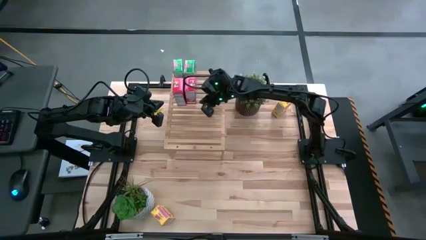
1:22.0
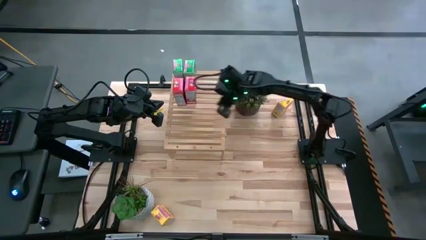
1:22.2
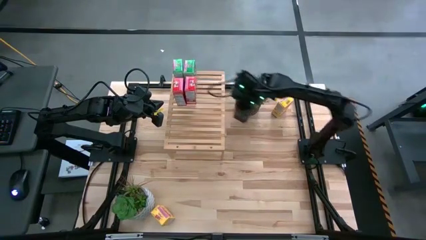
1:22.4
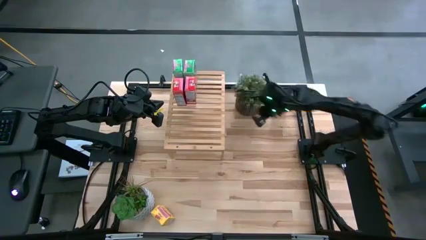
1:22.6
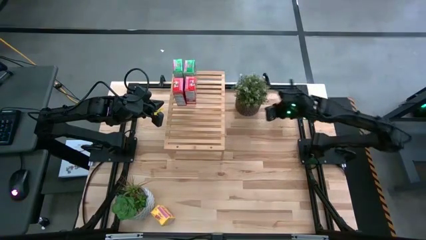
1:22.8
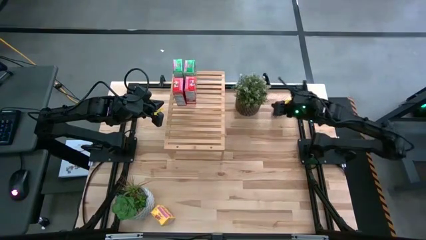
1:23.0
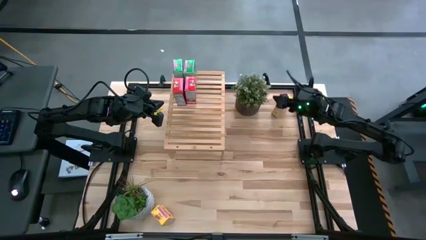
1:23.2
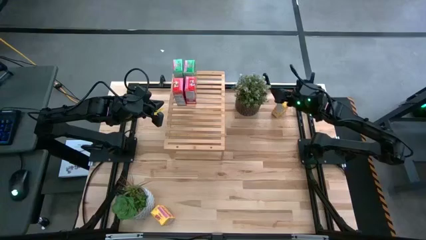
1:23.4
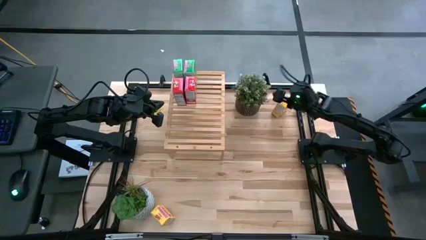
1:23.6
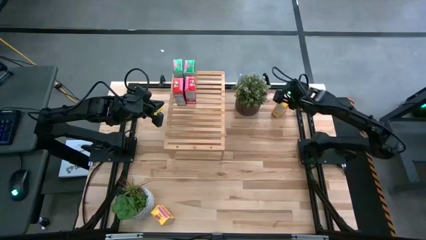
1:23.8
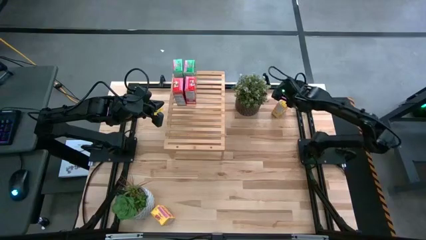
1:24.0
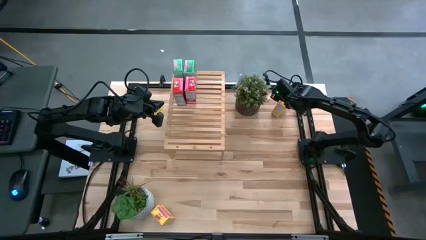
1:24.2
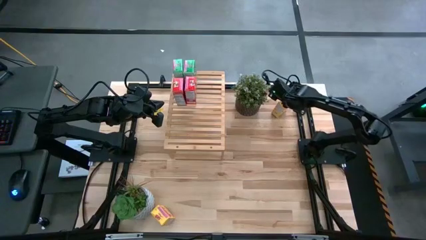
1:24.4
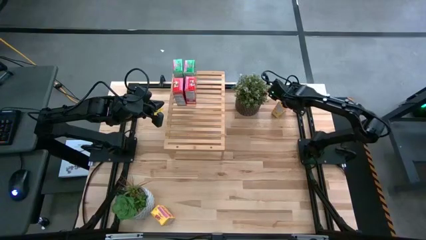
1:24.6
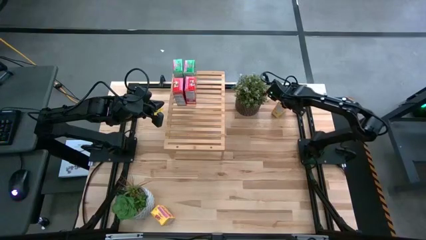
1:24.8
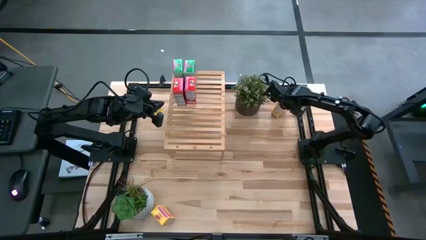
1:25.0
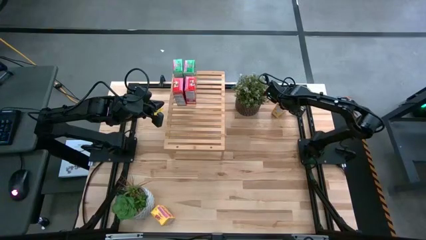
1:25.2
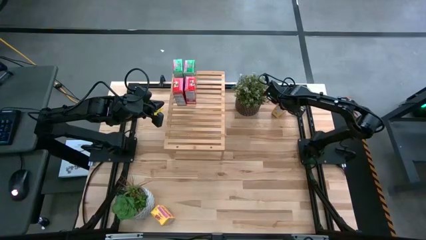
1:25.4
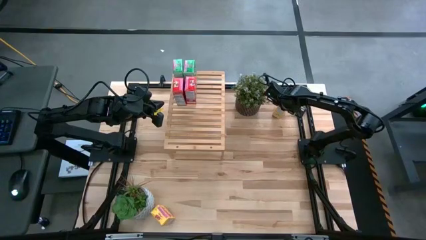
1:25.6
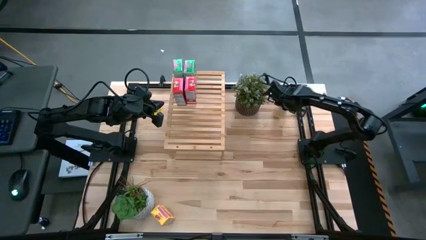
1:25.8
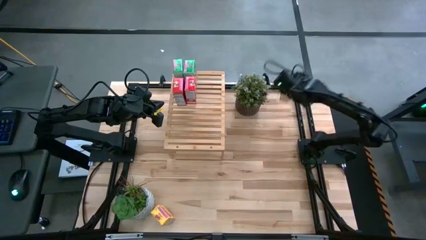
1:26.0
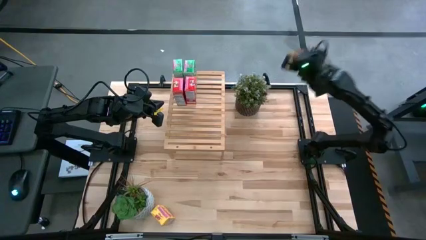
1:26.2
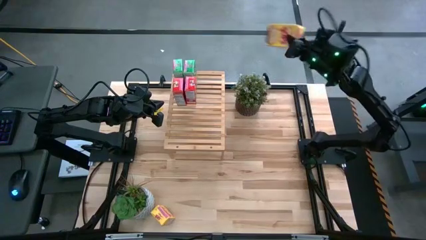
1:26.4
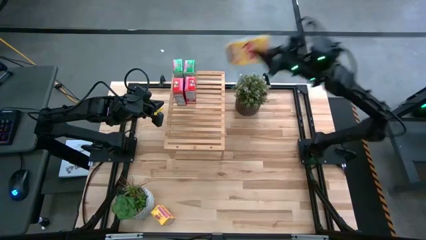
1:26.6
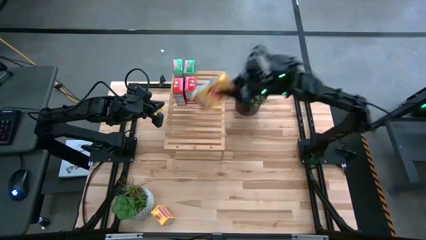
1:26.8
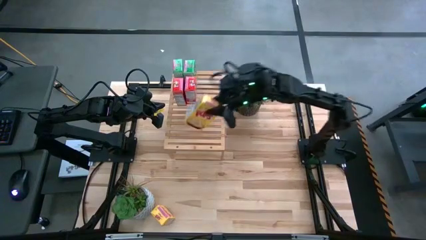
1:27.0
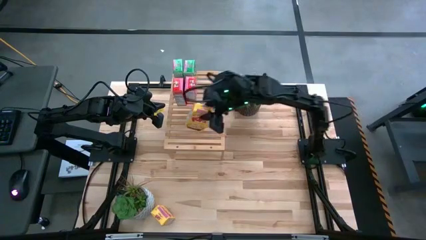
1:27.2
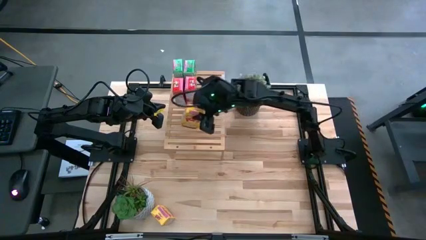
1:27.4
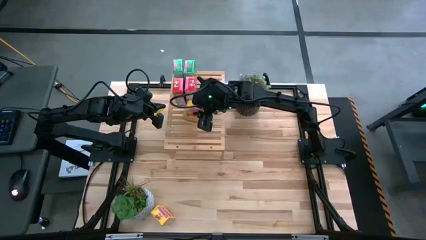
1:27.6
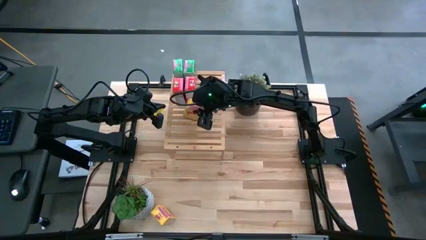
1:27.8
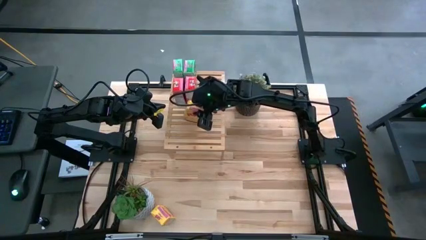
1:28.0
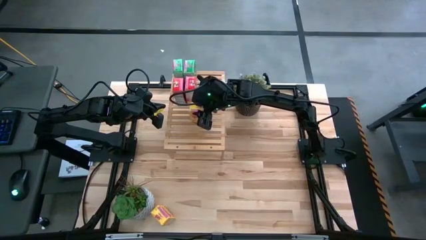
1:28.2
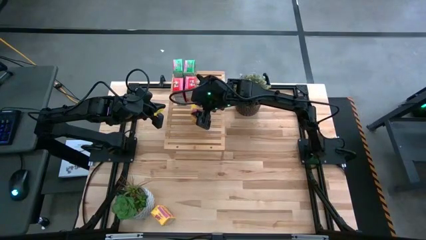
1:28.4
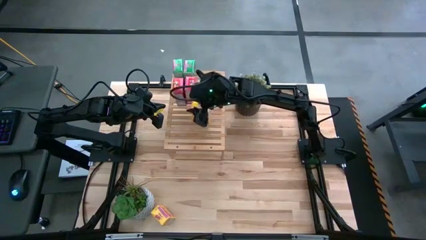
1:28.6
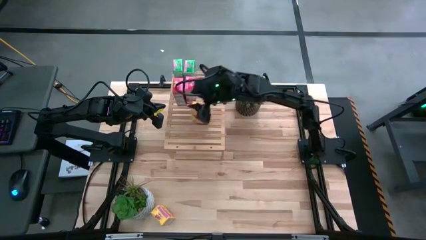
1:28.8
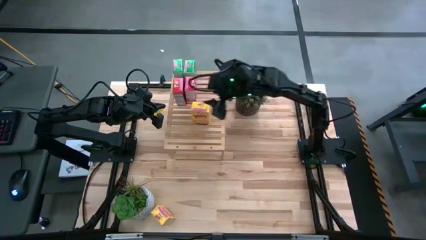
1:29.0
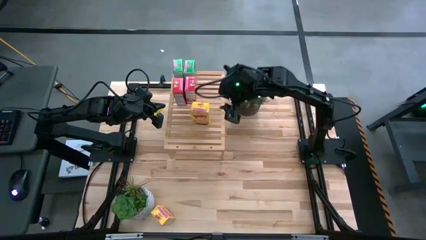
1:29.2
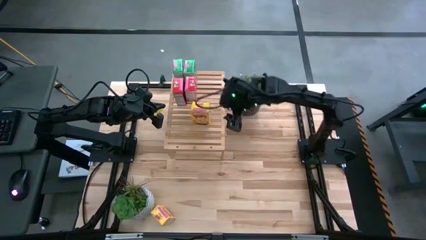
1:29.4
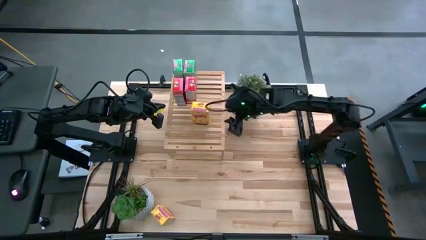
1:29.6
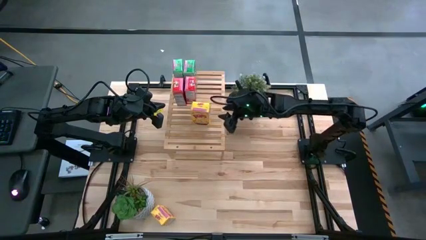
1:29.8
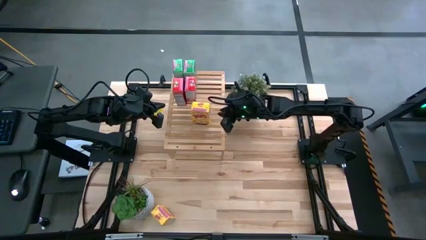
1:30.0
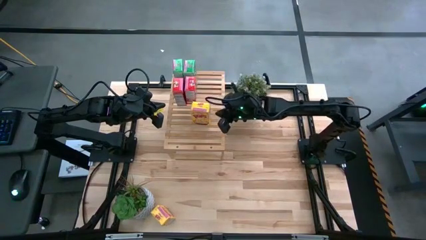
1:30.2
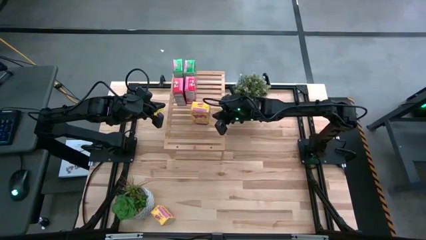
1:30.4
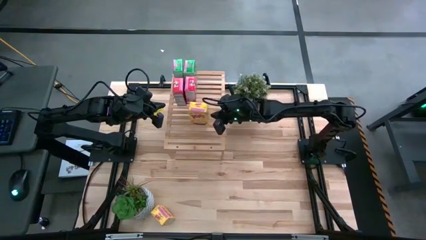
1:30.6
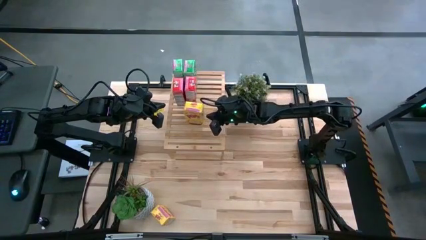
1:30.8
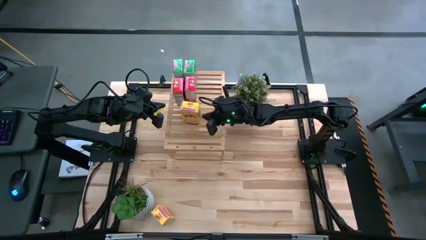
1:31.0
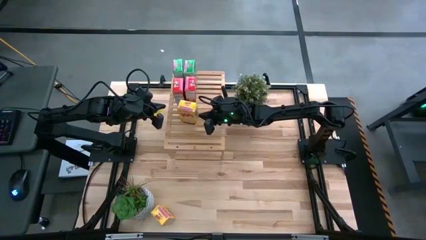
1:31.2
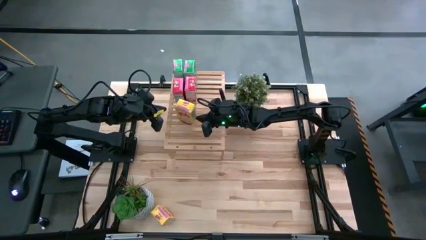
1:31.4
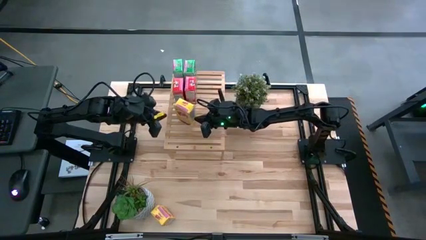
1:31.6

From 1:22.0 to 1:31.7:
Task: Stack cereal on shelf
Put the top yellow cereal box on the shelf

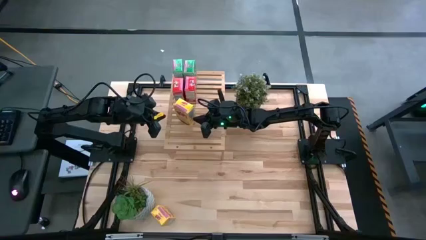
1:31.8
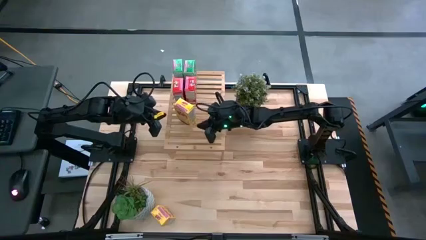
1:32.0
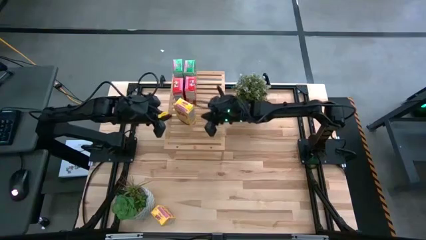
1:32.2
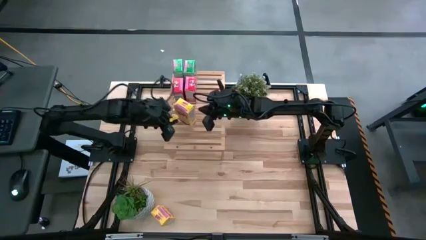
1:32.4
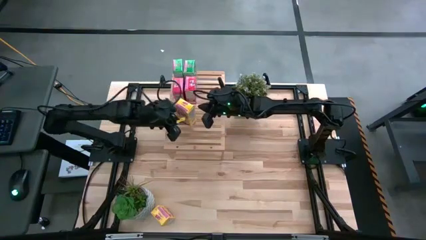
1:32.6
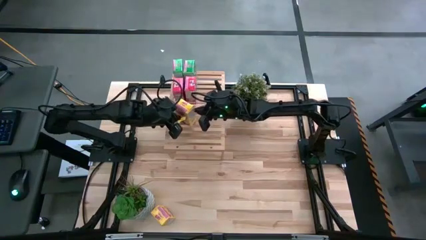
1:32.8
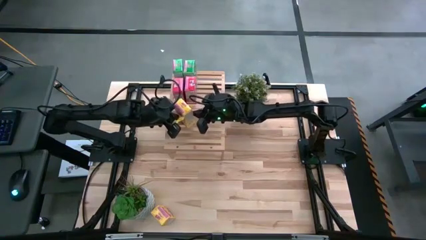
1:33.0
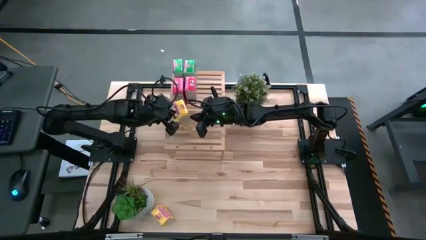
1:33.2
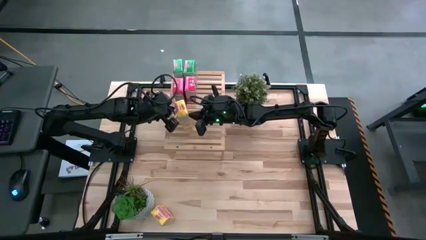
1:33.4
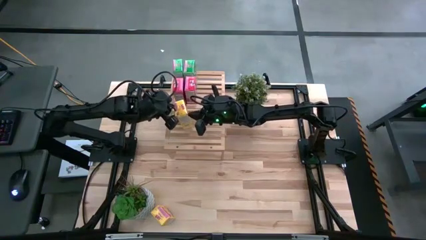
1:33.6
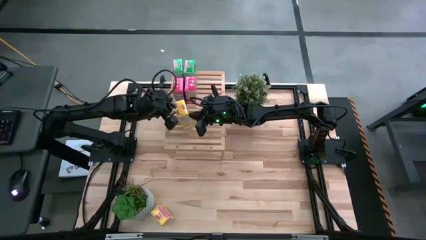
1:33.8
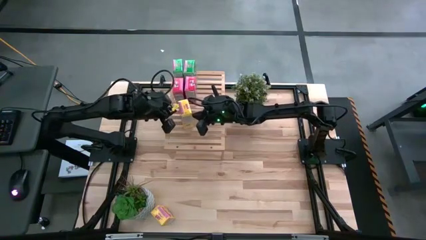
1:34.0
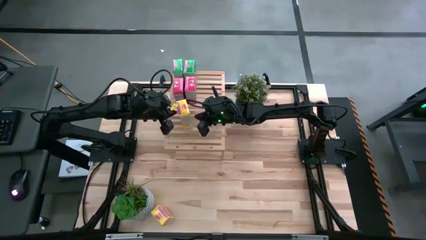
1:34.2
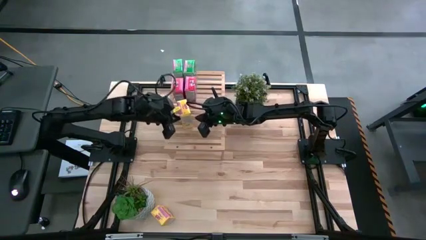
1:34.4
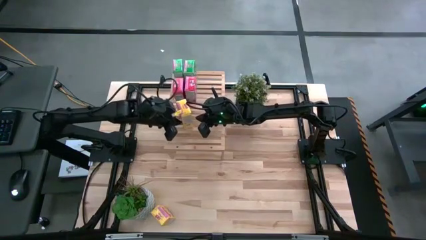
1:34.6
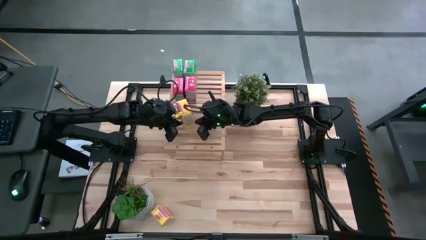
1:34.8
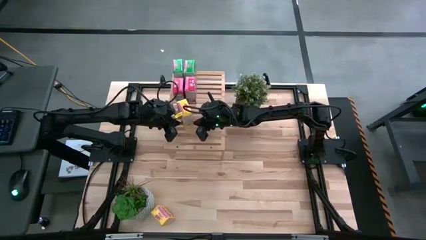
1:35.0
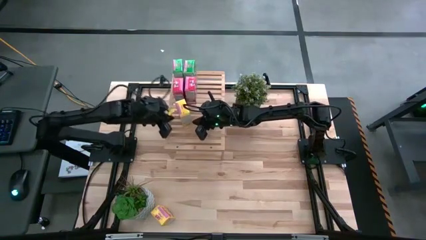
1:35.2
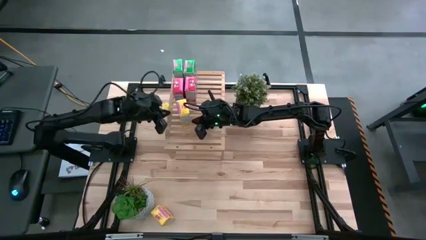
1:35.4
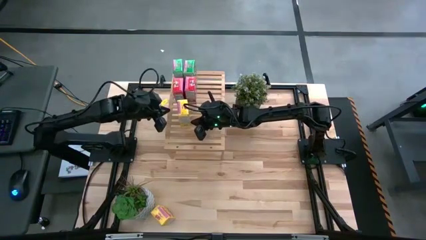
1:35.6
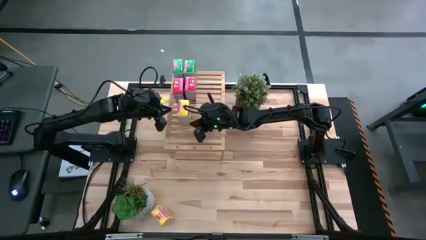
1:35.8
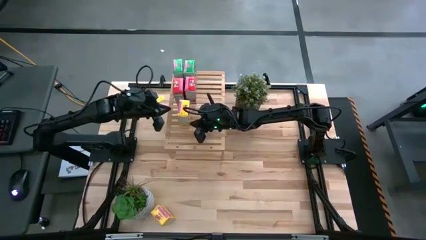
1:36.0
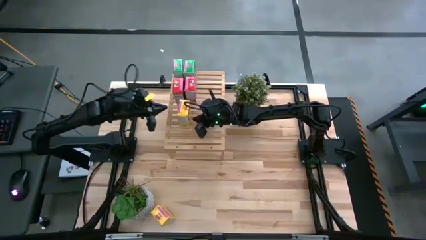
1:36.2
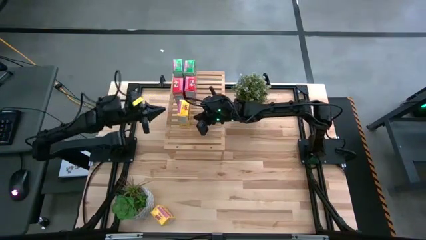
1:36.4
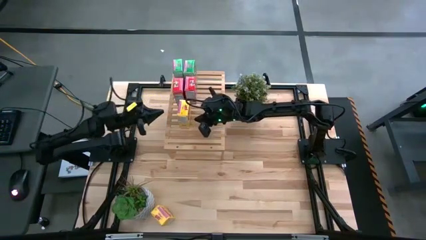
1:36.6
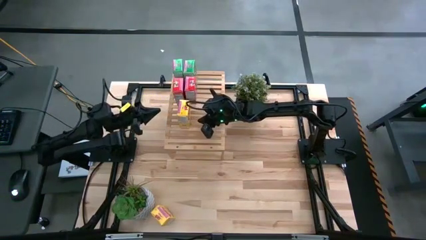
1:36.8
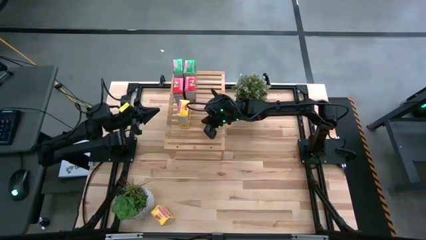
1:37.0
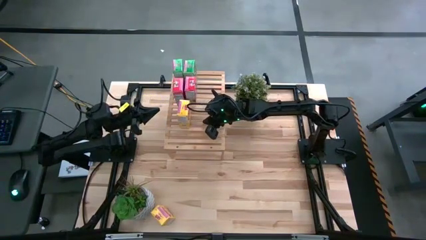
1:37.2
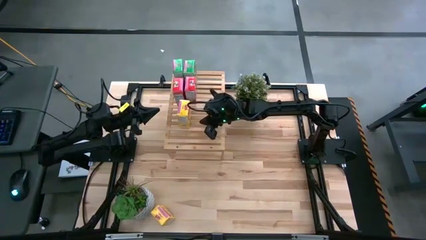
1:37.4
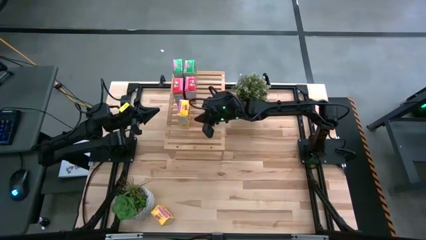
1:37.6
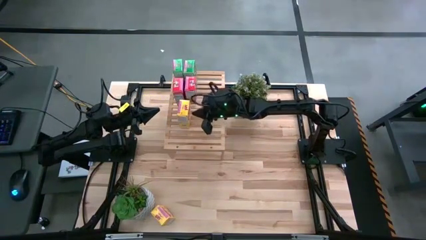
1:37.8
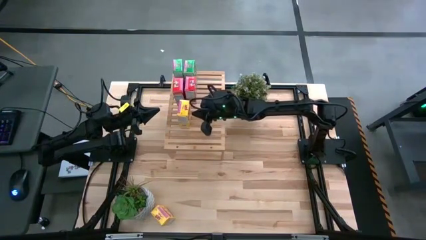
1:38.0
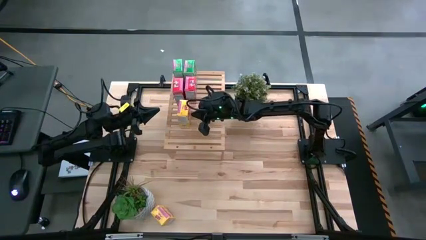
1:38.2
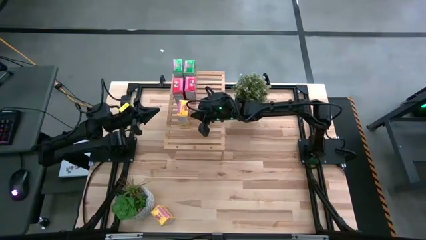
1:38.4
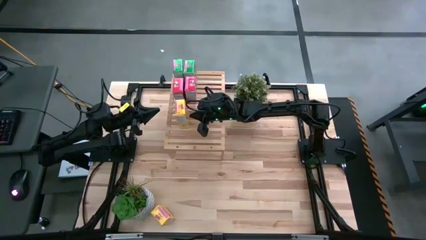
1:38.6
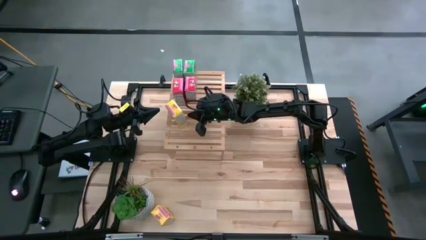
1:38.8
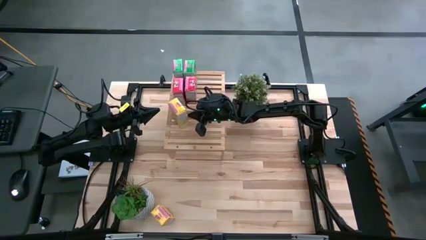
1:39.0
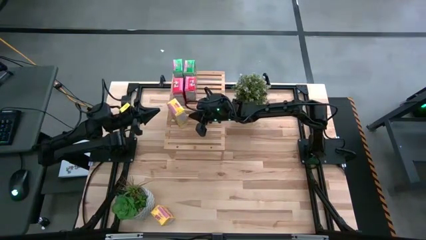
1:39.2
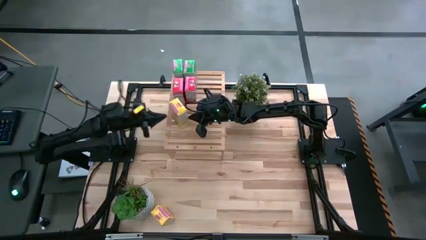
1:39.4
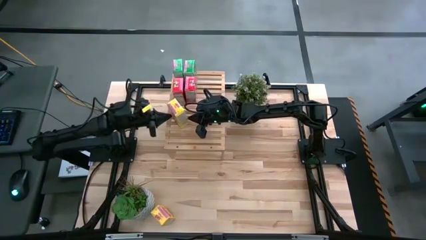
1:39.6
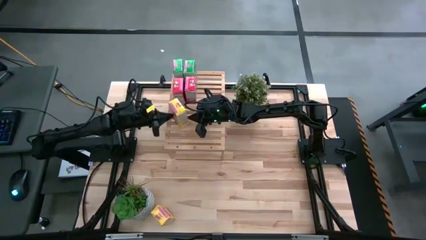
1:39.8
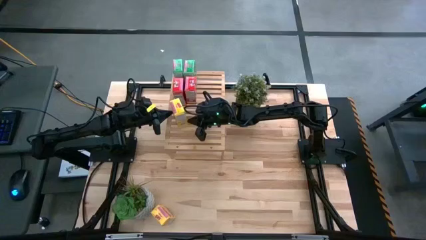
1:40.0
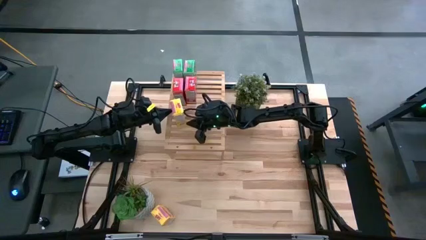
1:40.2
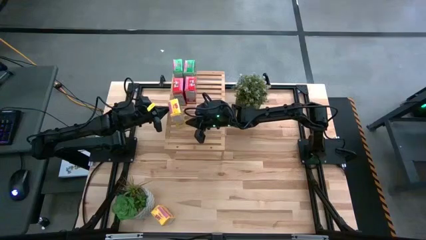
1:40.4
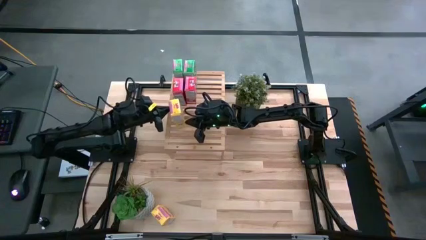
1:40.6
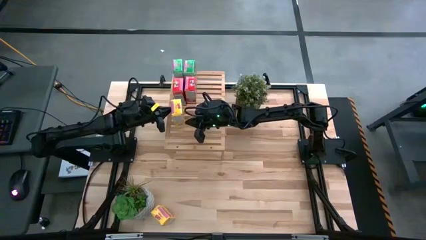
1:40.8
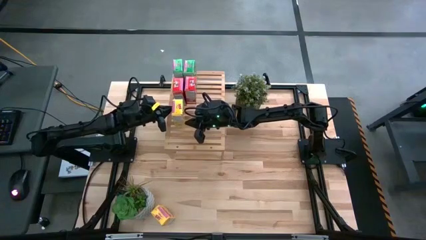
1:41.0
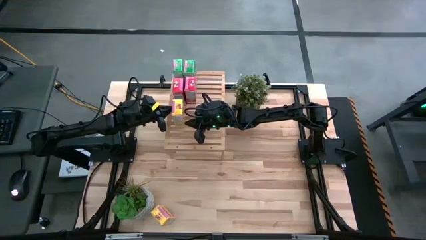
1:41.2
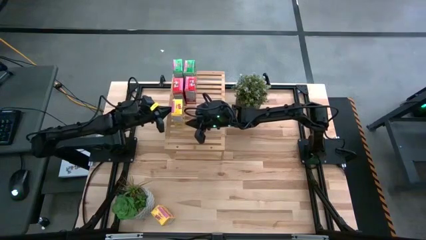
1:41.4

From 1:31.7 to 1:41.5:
Put the top yellow cereal box on the shelf
